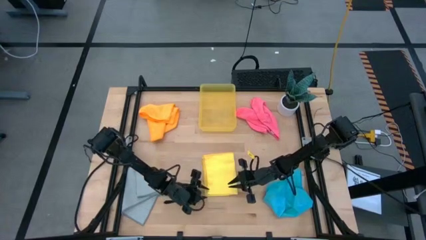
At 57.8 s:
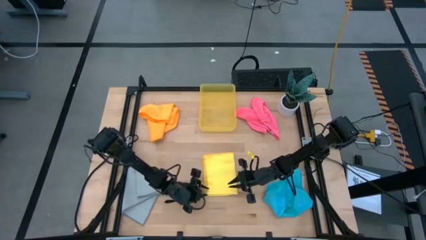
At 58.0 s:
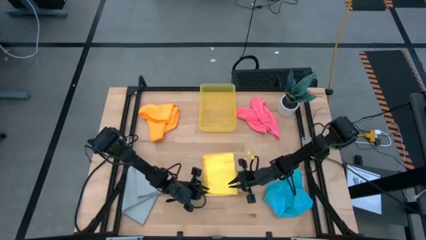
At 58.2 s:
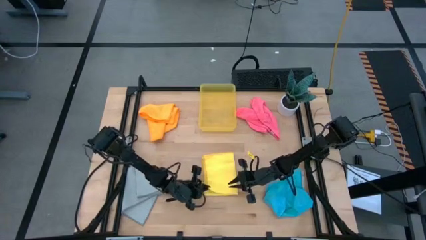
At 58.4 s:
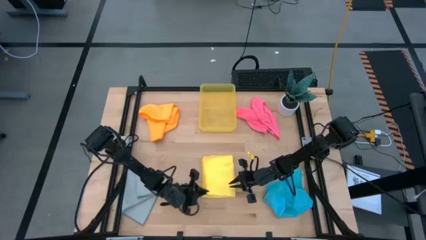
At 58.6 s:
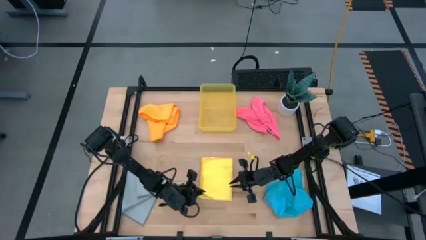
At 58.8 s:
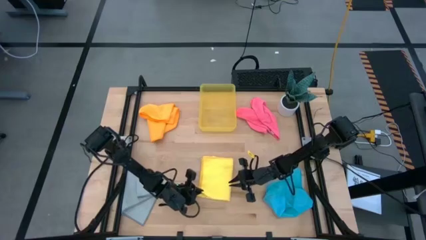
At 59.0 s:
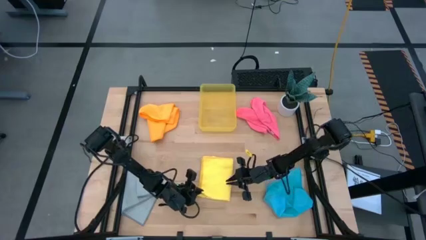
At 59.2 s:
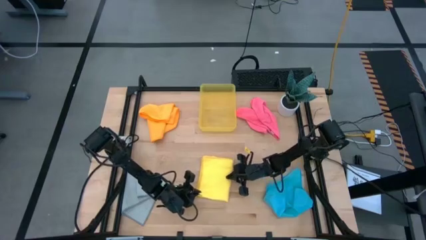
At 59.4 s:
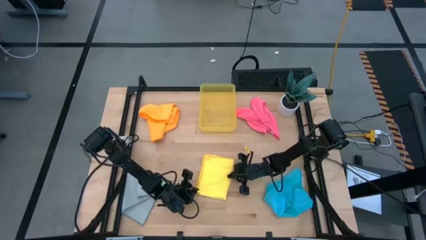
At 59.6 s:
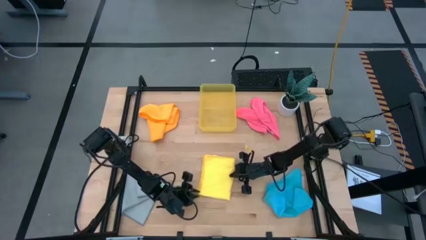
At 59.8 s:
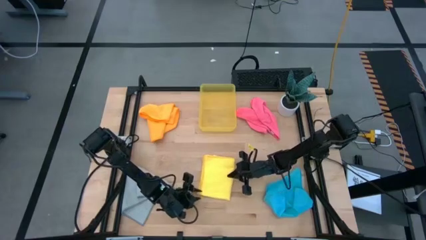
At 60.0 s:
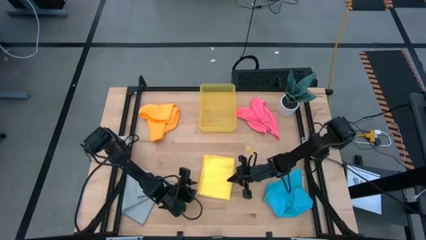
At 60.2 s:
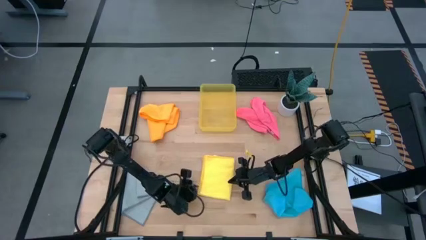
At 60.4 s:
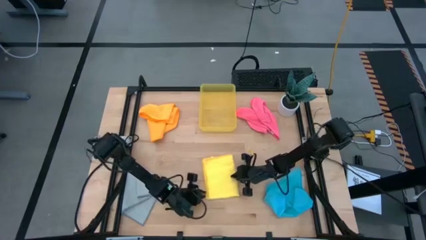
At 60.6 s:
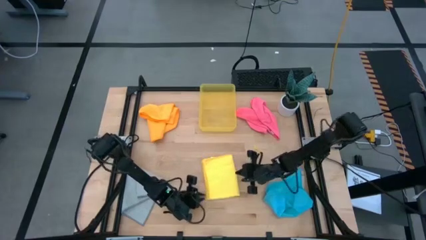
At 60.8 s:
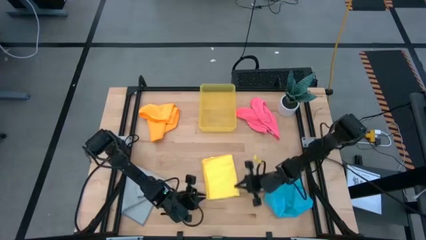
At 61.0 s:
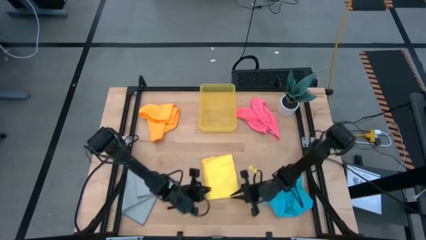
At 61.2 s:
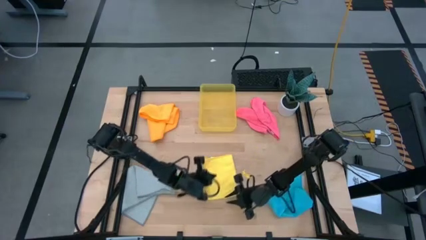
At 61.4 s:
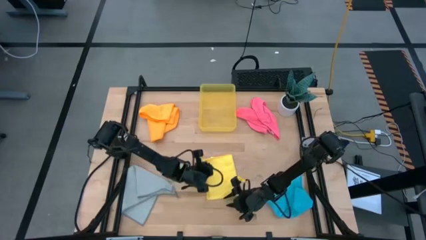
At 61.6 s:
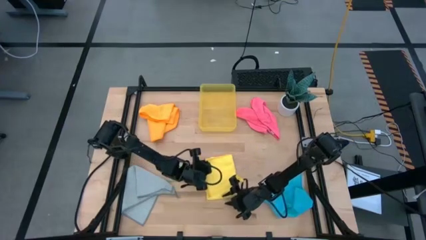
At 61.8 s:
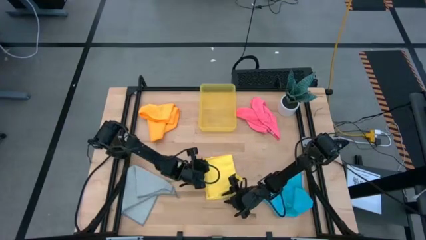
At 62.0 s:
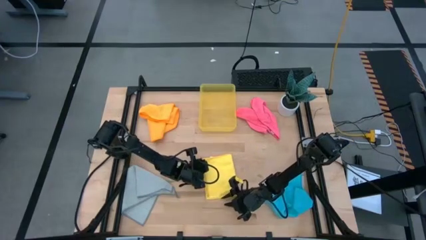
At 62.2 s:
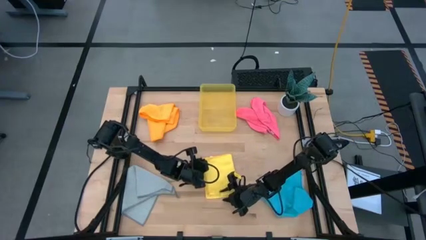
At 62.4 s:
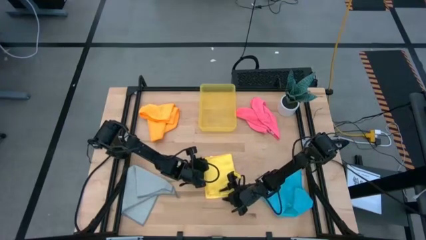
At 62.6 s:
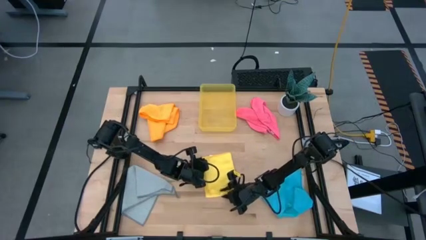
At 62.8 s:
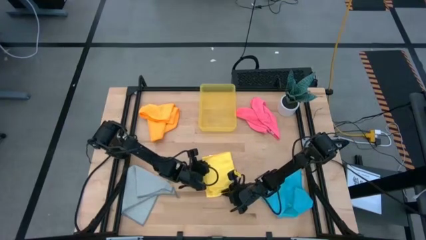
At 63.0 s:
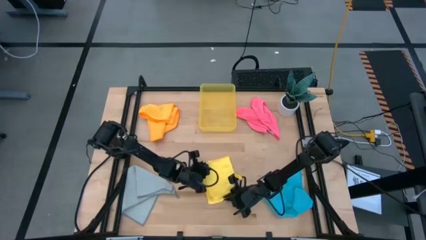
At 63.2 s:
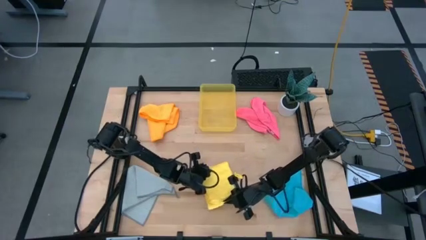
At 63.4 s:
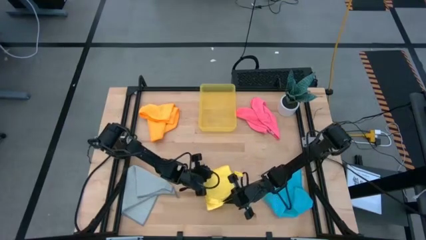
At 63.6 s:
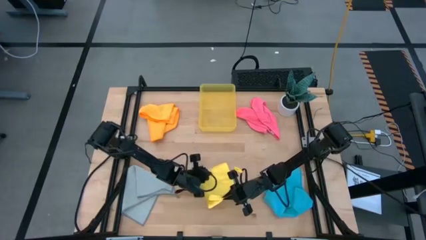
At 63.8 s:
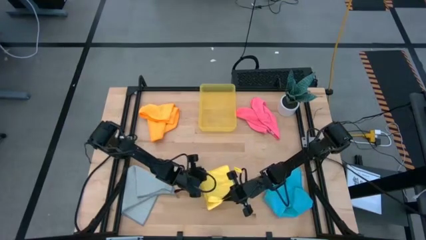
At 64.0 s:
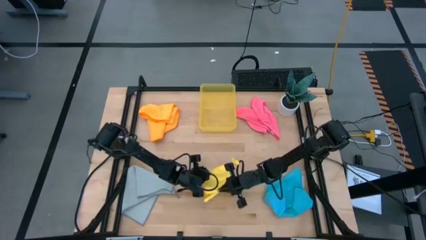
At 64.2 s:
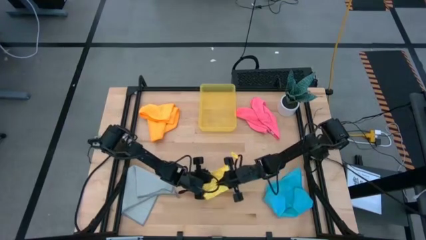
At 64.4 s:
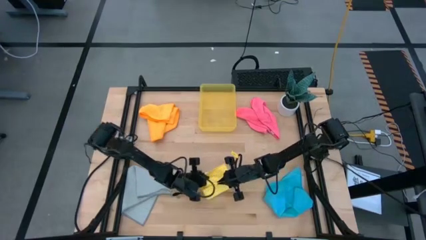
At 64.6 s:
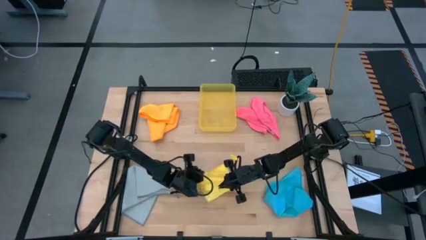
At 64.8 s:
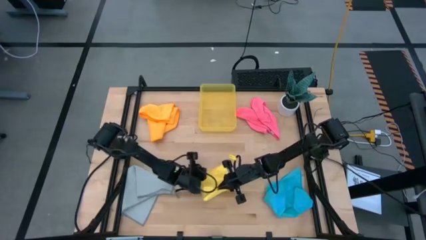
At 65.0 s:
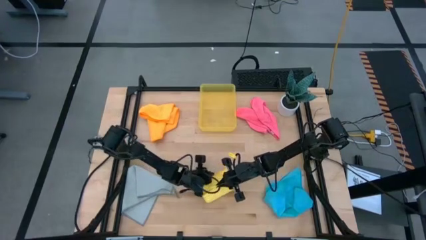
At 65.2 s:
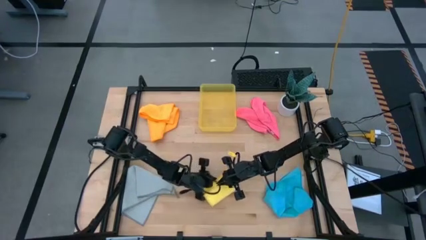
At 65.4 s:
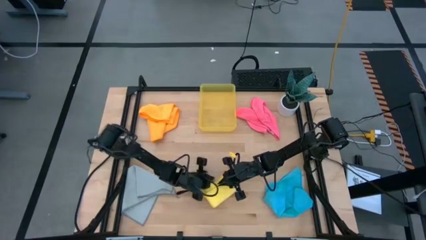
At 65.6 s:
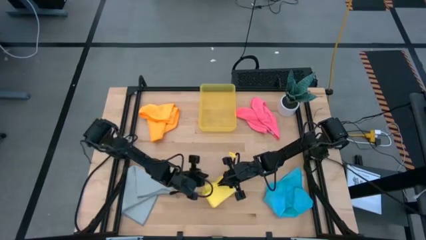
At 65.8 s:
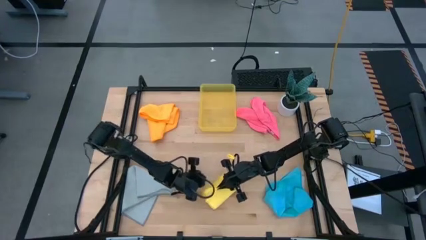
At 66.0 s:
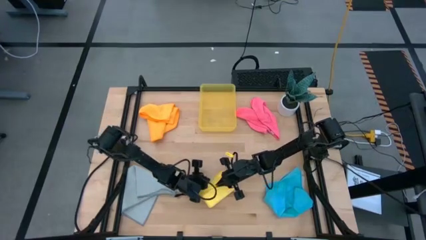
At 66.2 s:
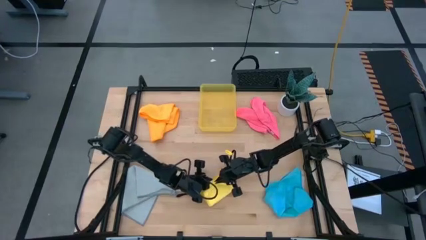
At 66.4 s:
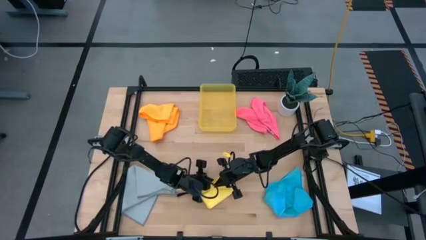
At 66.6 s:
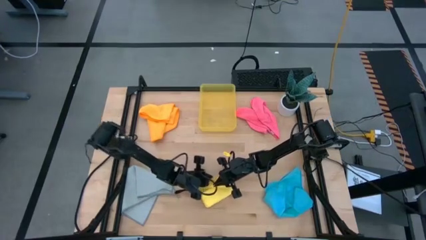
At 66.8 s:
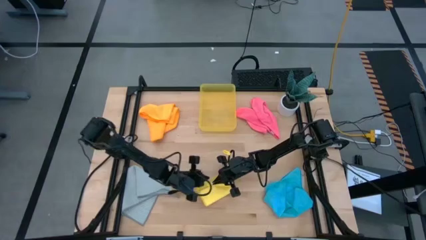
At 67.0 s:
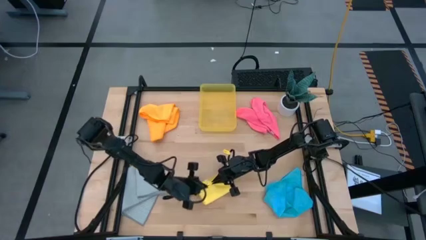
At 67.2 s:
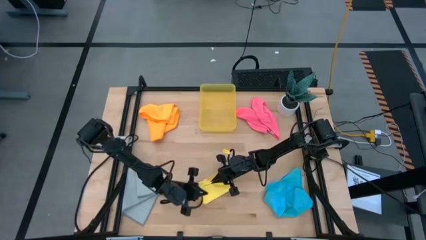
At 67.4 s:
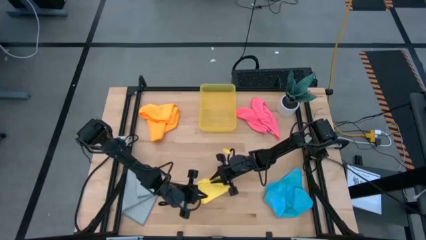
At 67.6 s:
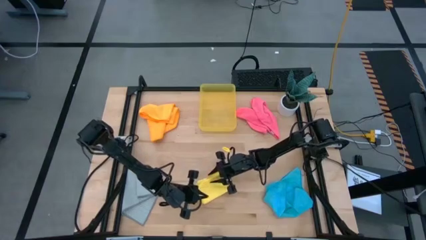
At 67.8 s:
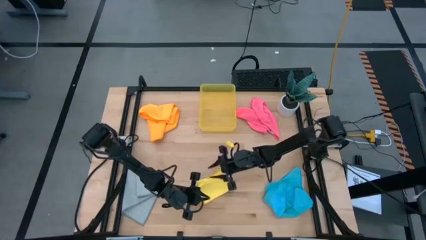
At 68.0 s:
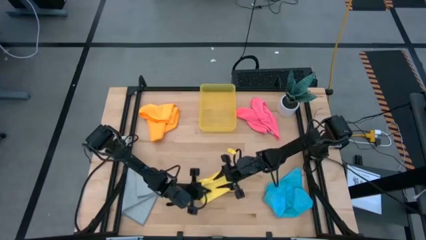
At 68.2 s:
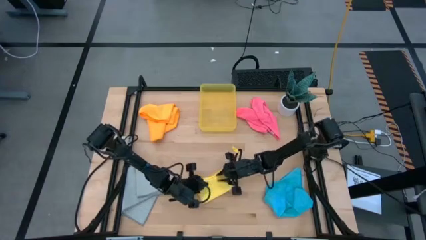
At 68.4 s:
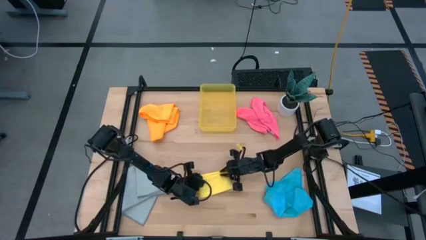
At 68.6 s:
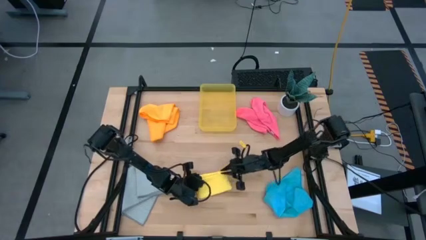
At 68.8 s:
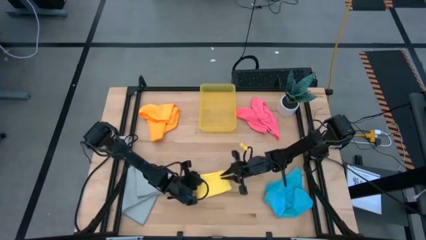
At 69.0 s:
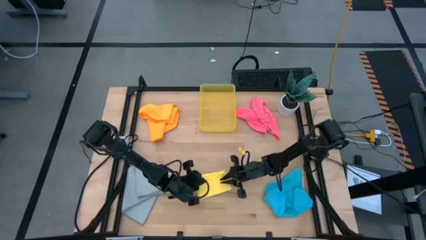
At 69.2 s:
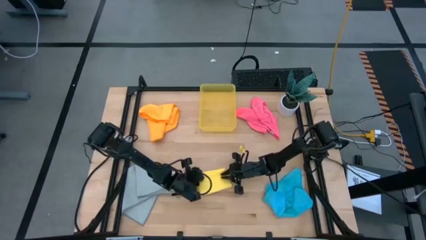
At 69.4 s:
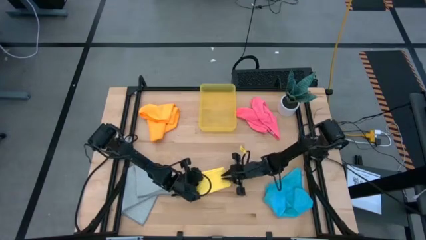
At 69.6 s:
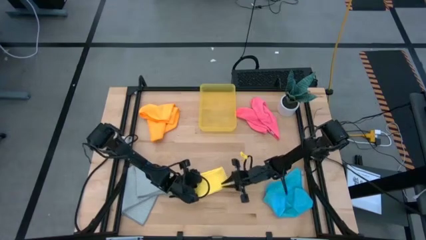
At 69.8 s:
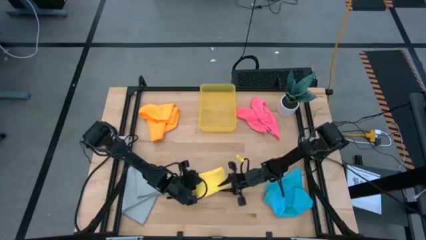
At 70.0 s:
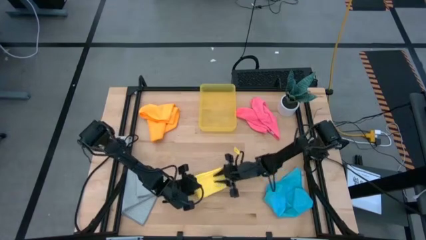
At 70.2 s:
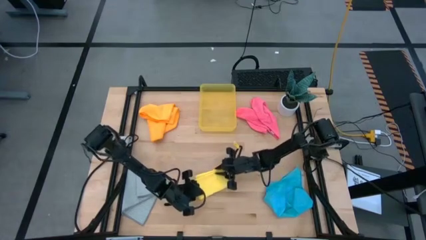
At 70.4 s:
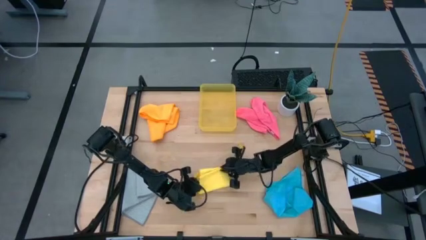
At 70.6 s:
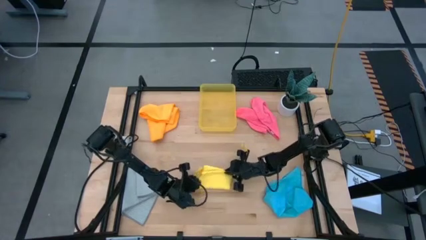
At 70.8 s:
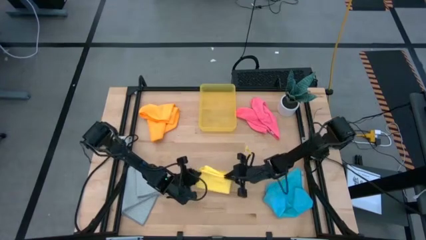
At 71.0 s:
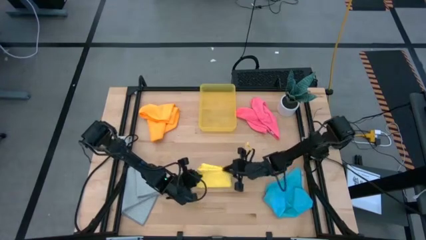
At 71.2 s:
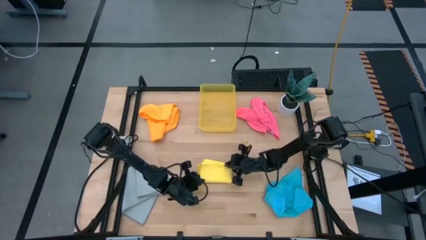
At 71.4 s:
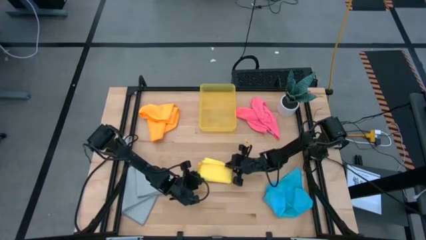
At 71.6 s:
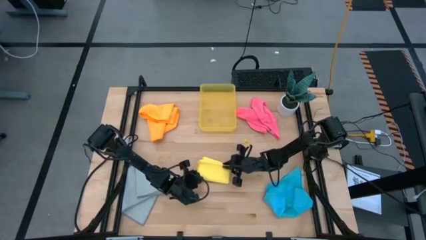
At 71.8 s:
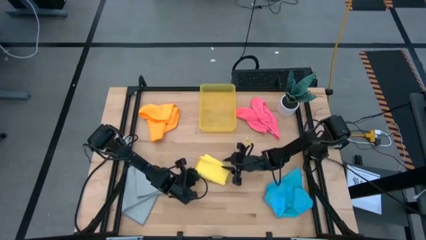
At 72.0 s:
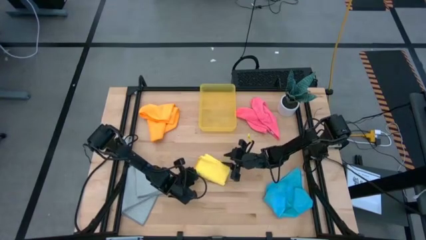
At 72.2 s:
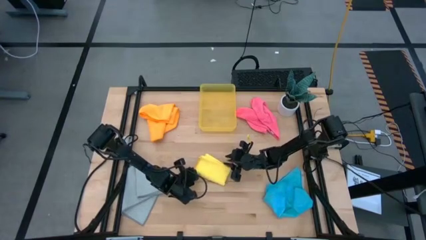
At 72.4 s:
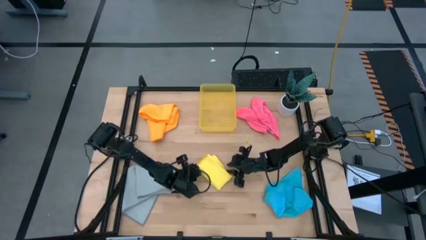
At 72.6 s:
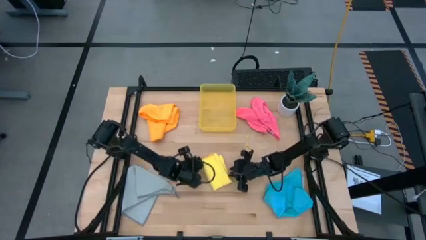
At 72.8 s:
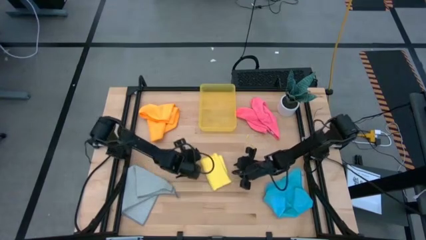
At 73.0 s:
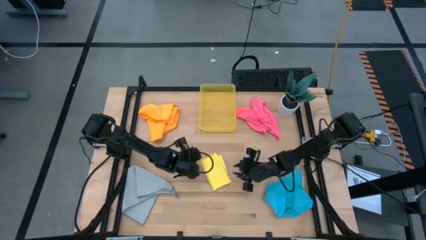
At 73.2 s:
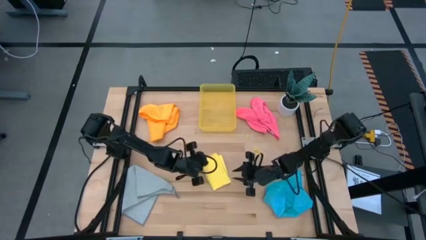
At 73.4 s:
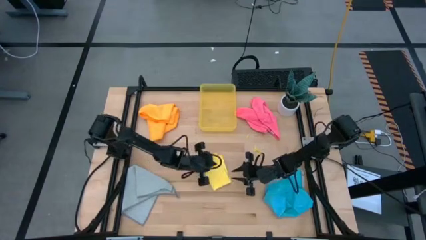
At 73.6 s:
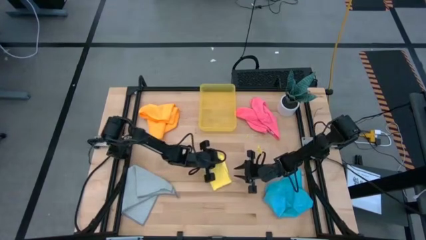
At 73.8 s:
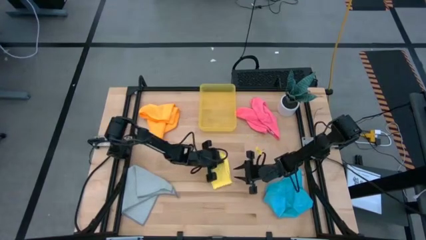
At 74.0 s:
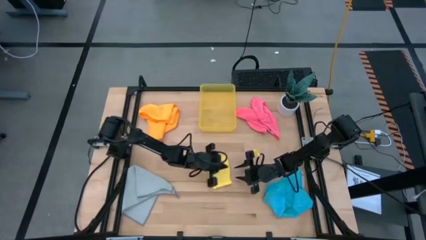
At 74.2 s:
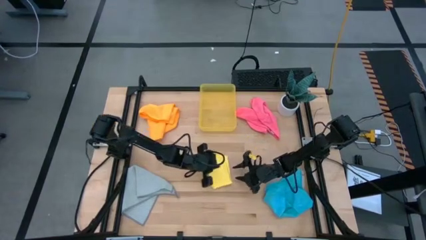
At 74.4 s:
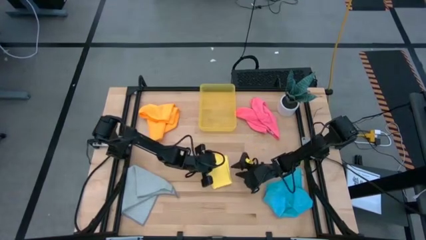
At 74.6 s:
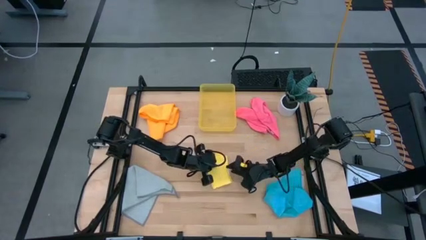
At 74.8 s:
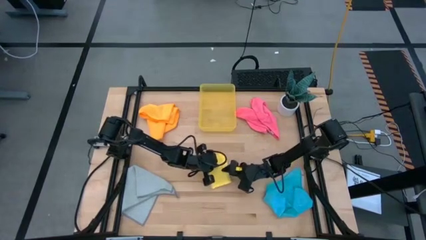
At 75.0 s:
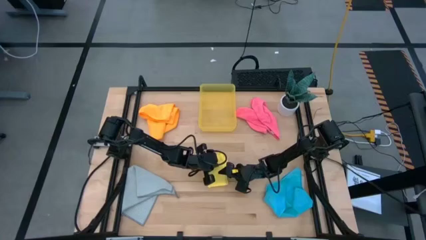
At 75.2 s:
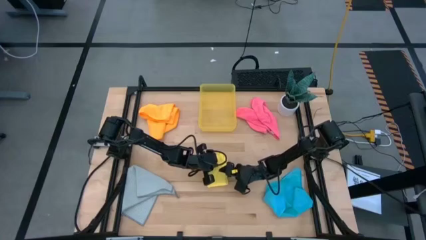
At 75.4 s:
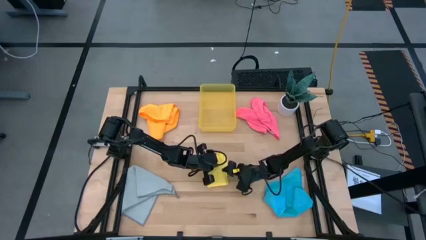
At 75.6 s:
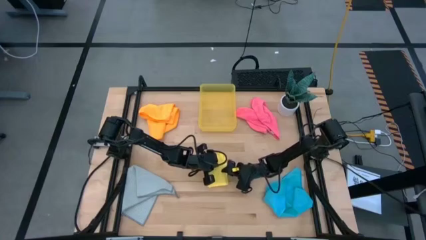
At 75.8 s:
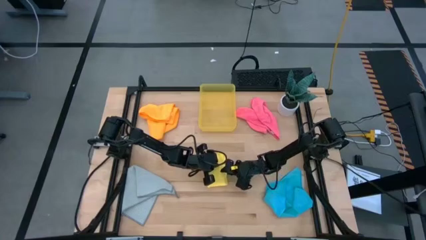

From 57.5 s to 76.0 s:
Task: Fold microfiber towels
Fold the yellow microfiber towel
